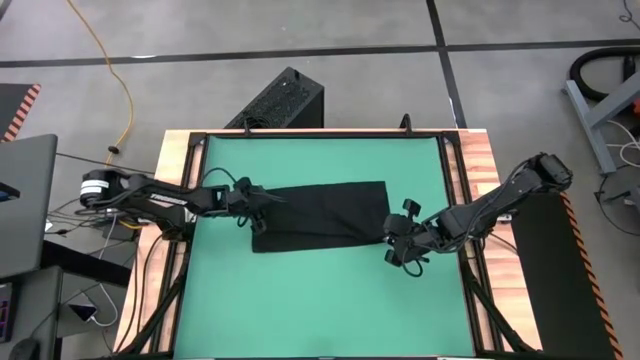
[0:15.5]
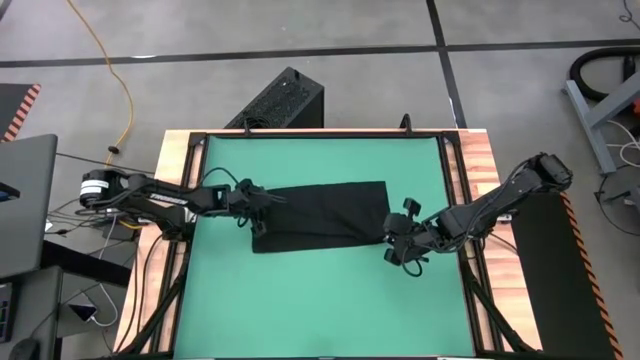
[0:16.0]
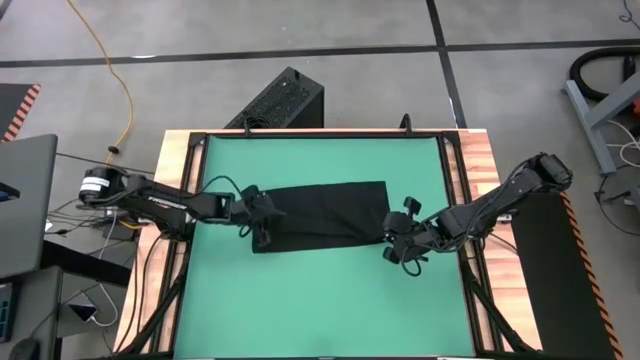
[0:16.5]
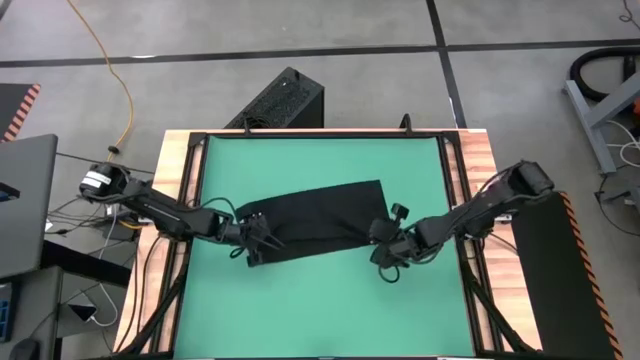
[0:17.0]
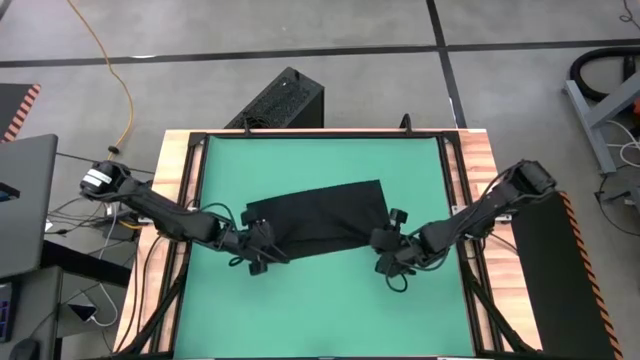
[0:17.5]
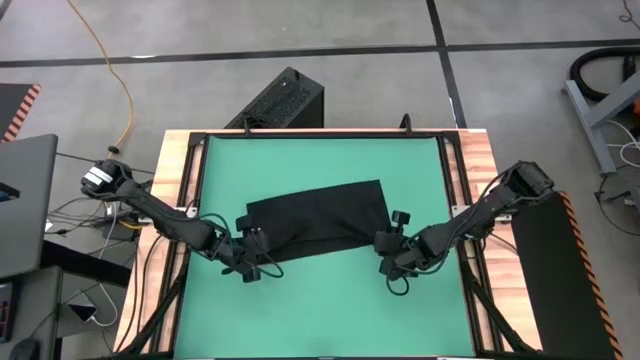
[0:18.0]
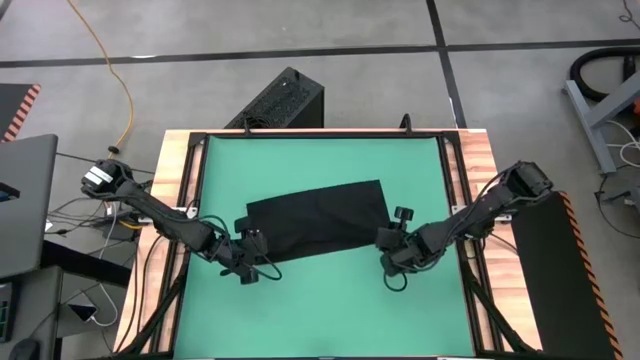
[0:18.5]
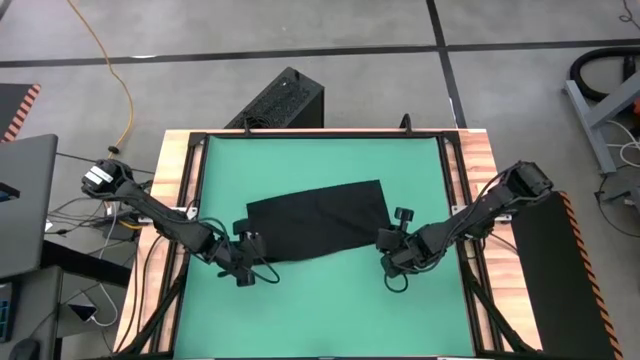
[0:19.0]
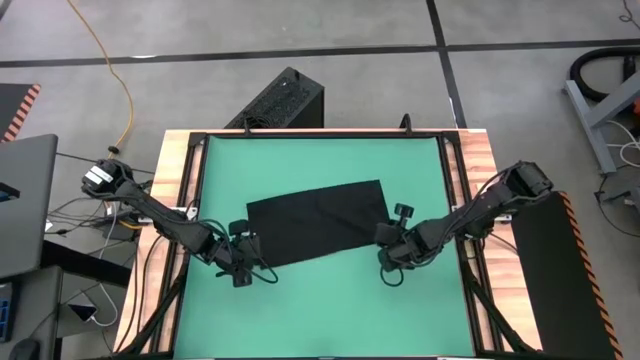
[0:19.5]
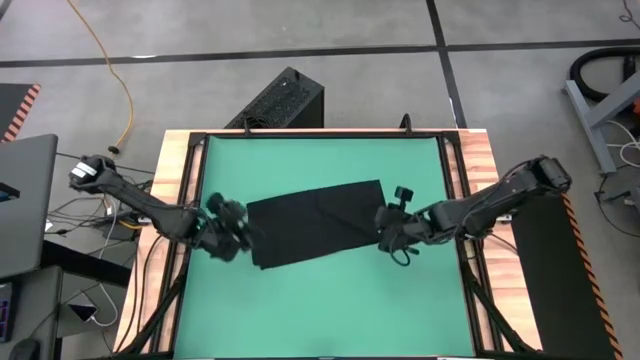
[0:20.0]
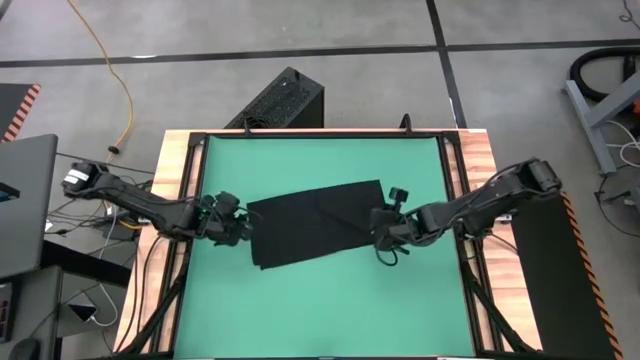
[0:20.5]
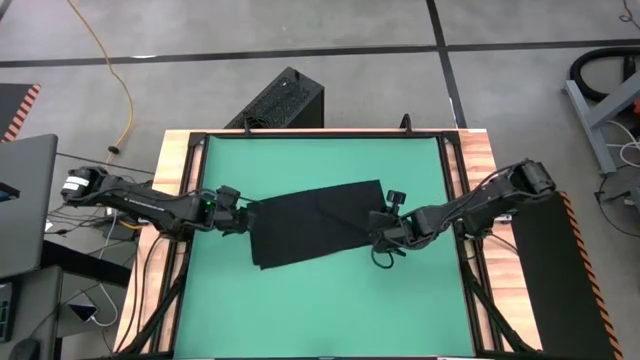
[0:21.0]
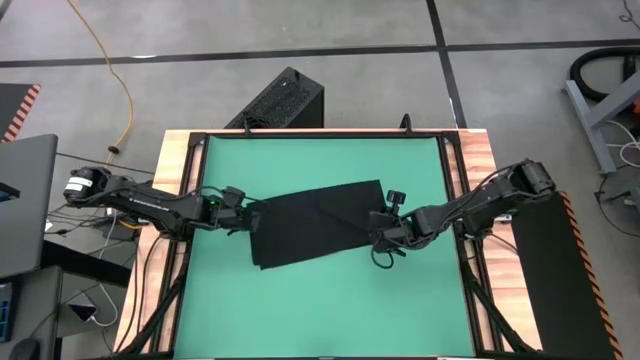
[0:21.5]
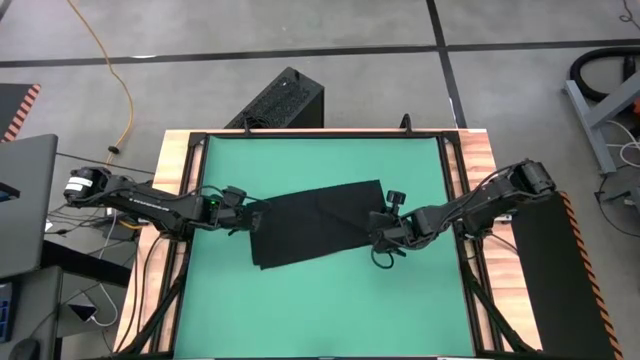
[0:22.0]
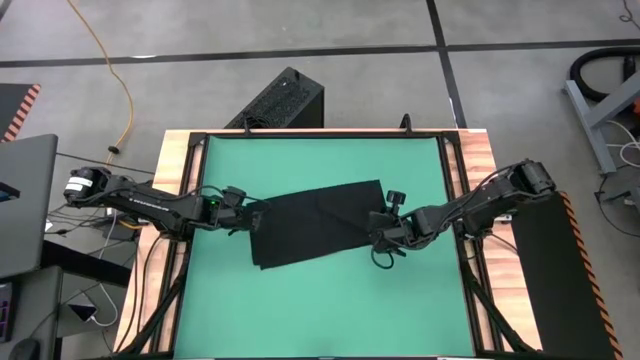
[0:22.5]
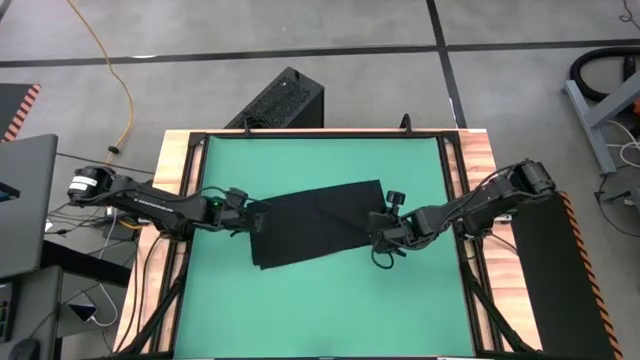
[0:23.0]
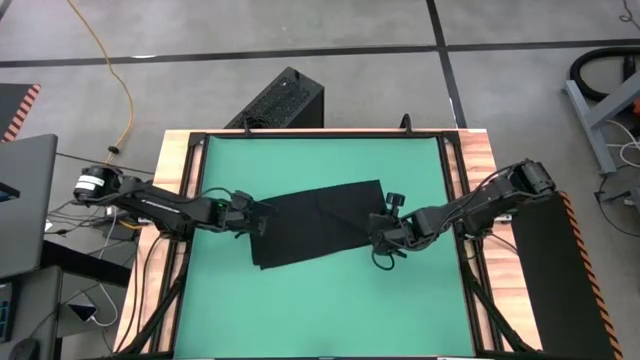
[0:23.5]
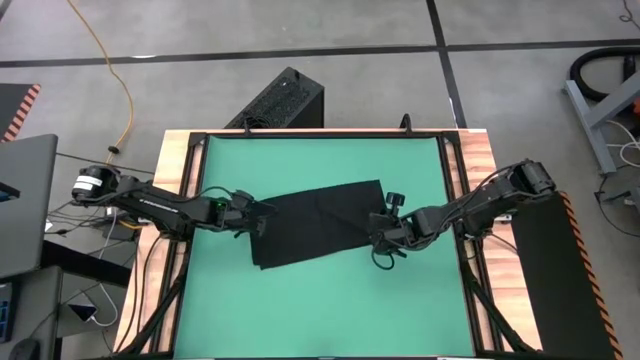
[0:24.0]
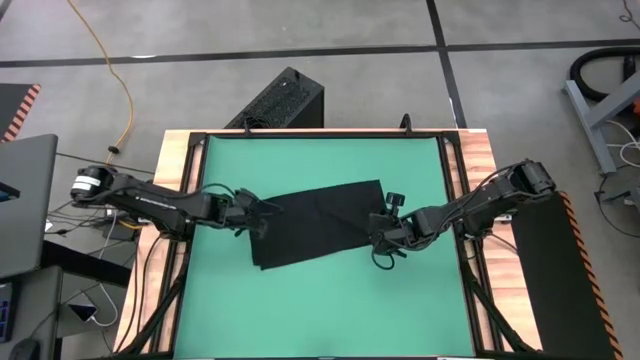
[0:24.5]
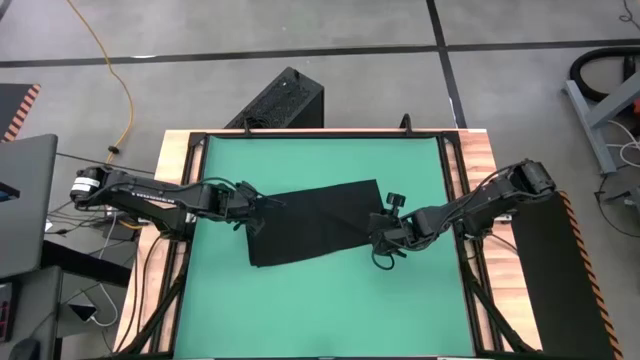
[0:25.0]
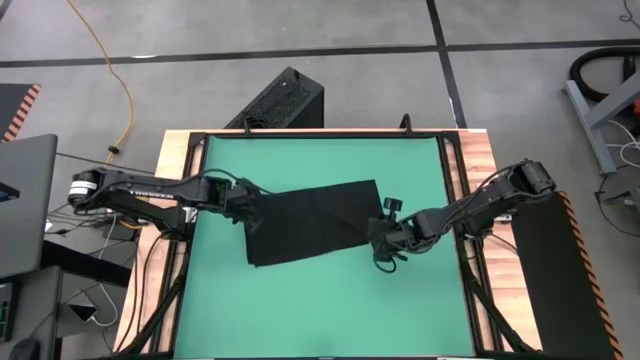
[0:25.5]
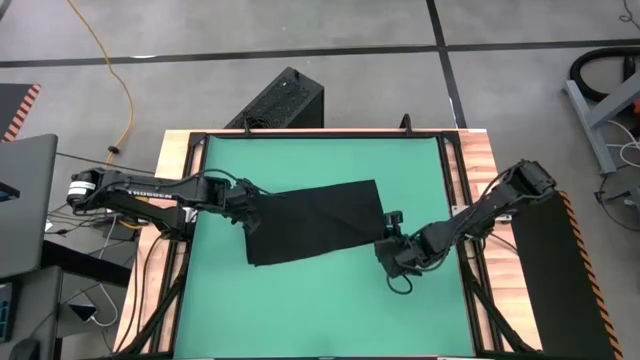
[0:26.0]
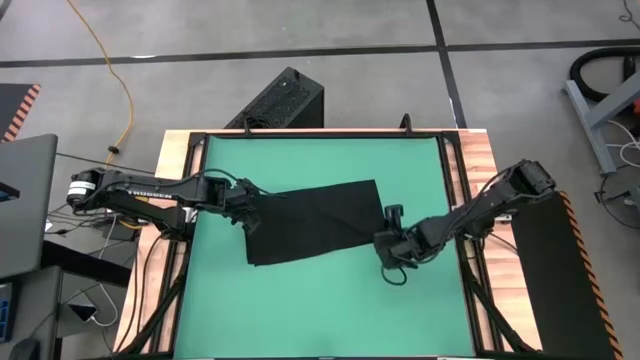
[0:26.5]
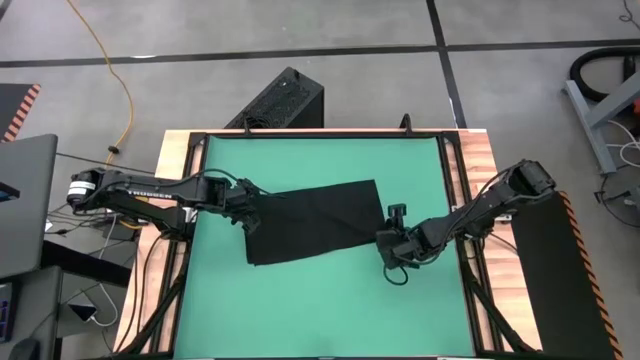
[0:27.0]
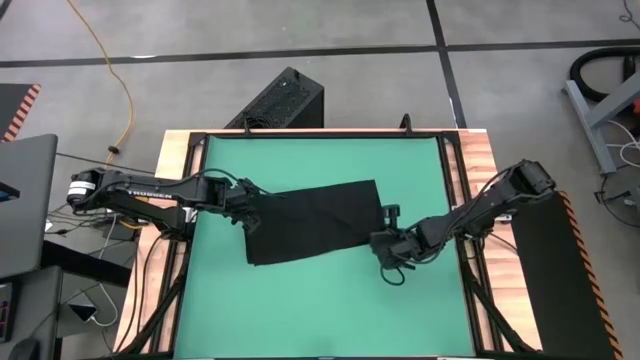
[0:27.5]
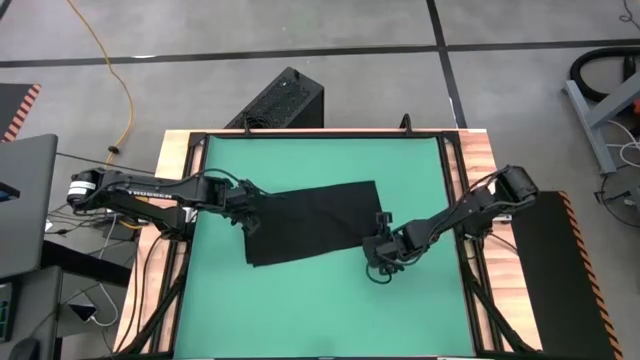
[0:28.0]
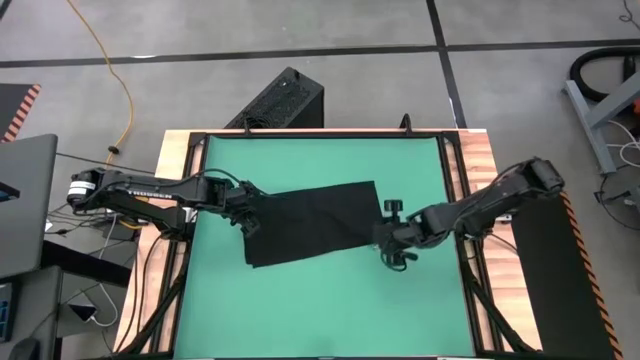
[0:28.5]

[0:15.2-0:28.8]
Task: Roll towel
Roll the black towel
